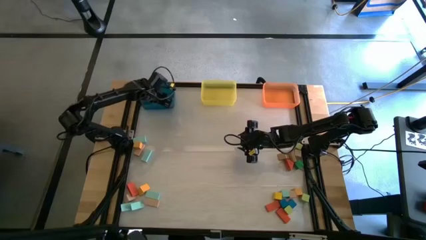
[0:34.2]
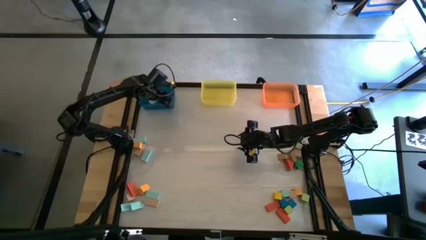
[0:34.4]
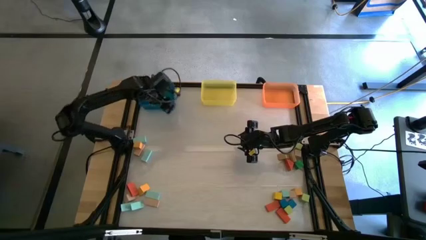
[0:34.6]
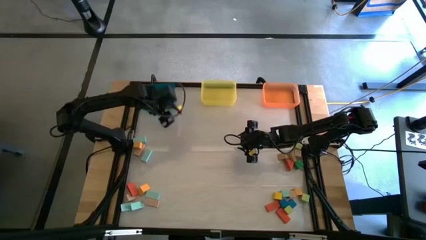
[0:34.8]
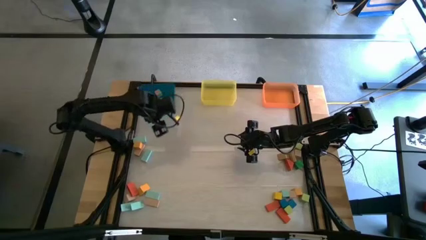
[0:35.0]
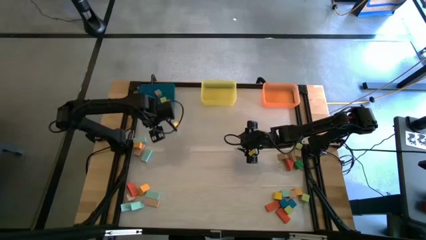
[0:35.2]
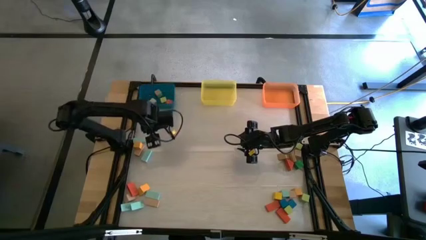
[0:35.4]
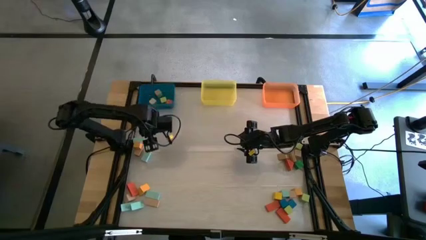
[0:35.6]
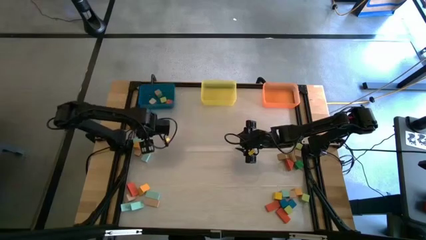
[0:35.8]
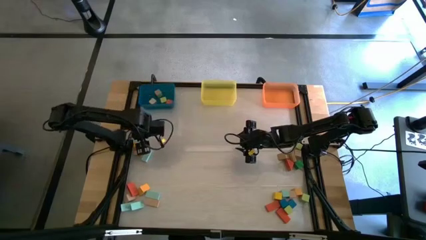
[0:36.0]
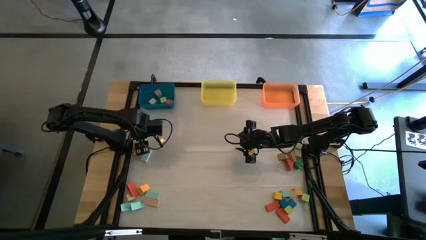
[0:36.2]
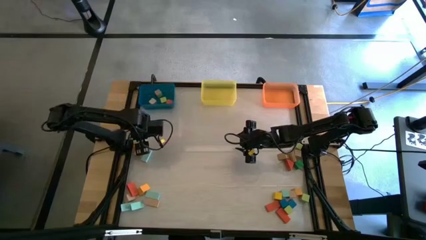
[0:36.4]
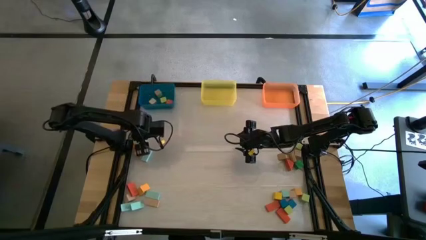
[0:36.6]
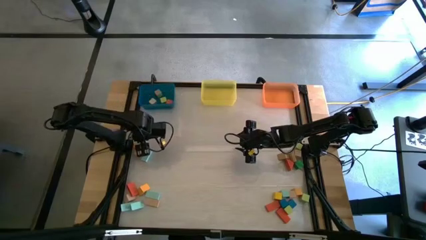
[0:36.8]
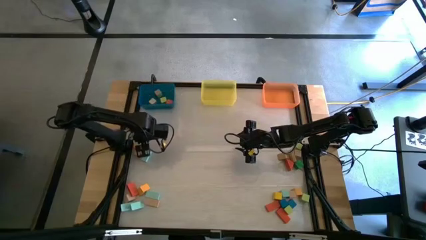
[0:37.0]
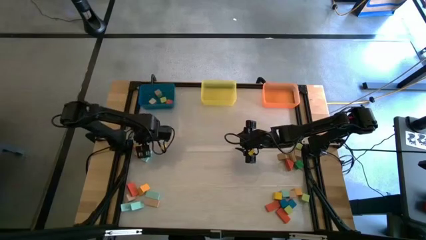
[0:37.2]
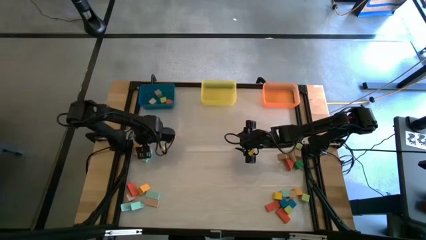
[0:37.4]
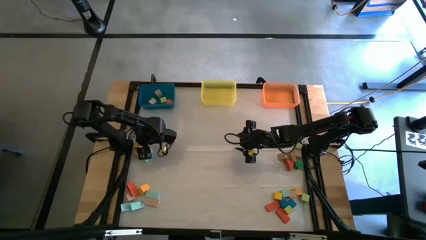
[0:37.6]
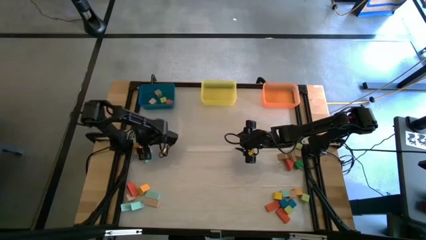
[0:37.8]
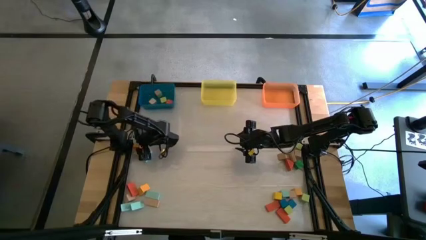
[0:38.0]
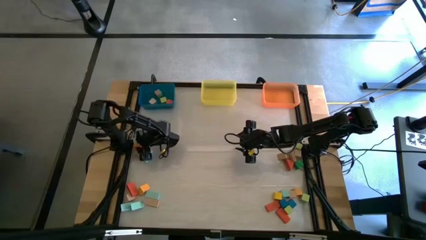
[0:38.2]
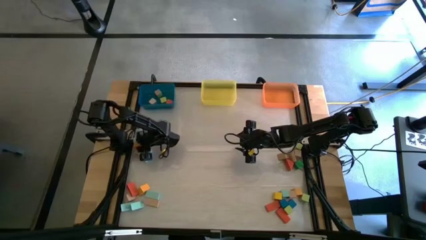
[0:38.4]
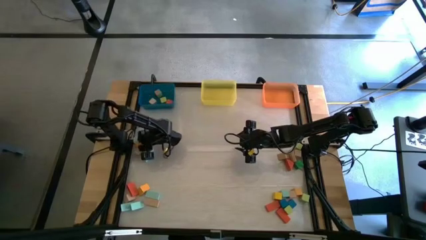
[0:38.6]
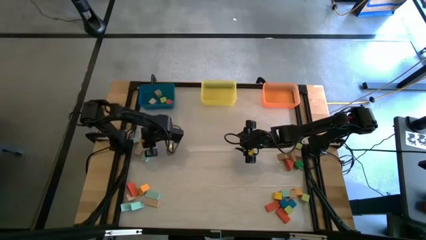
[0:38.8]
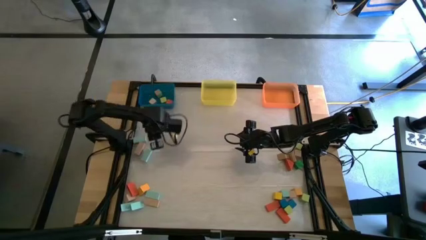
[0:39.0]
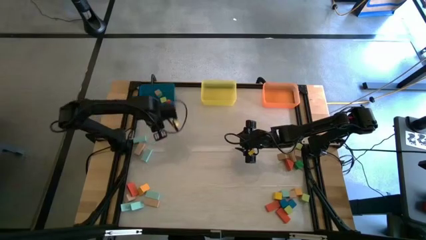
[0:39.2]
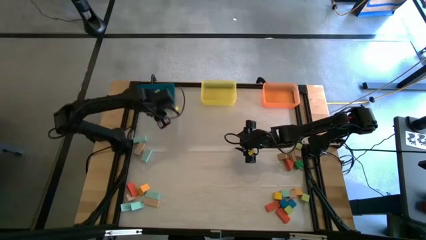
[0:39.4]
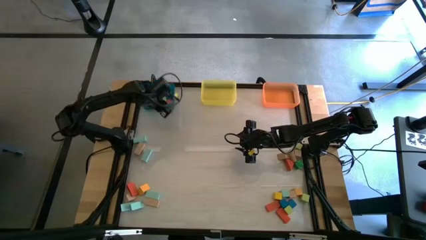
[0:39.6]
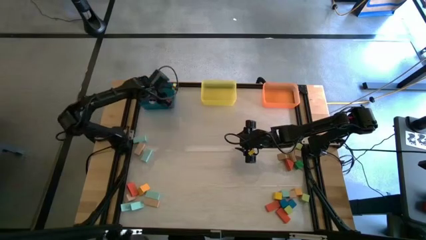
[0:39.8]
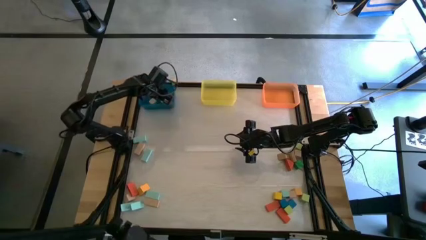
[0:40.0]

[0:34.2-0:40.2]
Task: Sort blocks by size
Put the yellow square block into the blue bin

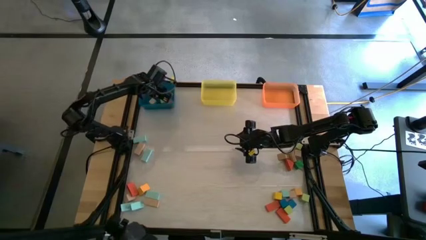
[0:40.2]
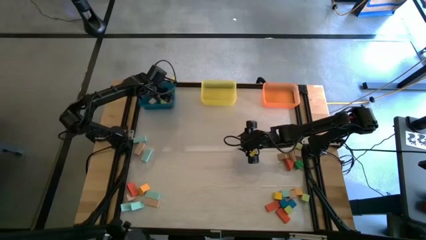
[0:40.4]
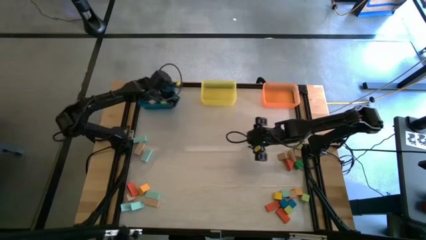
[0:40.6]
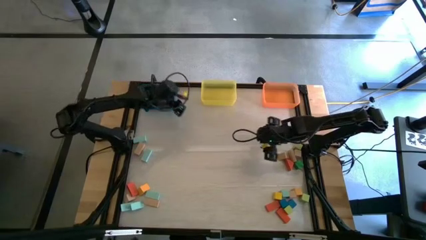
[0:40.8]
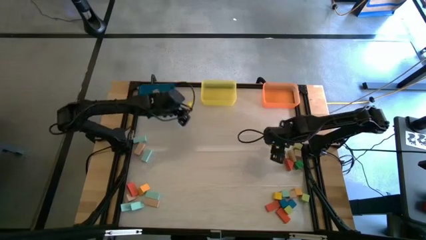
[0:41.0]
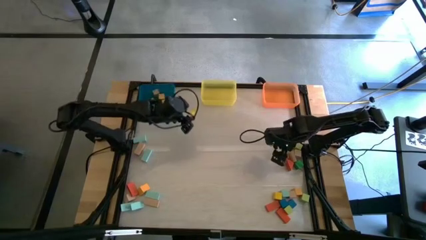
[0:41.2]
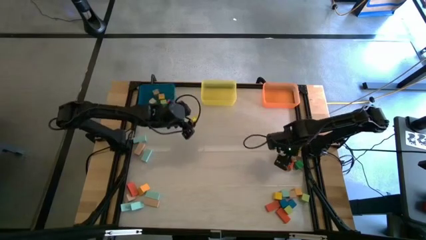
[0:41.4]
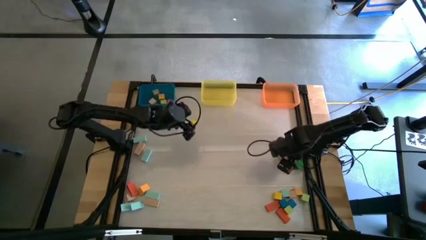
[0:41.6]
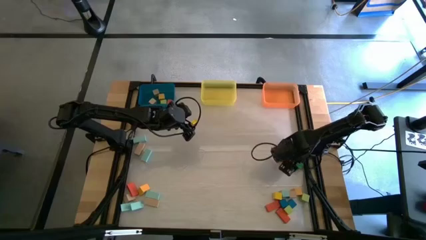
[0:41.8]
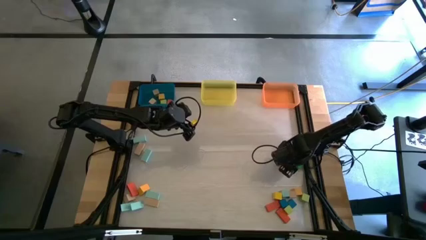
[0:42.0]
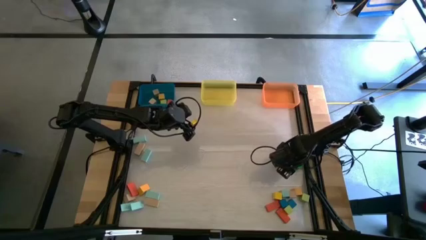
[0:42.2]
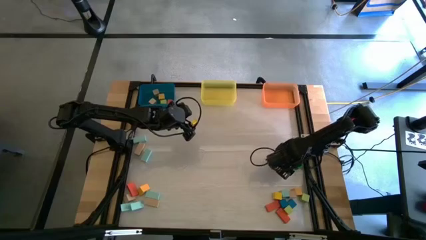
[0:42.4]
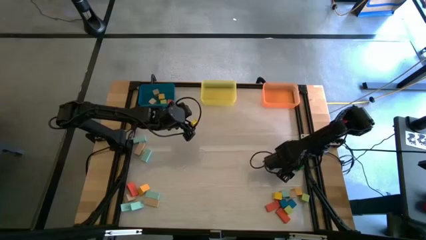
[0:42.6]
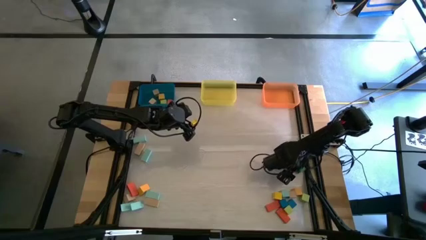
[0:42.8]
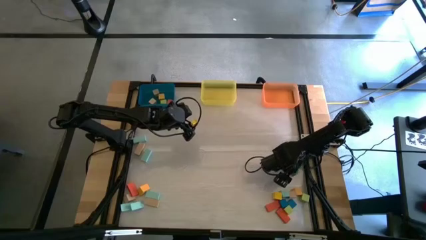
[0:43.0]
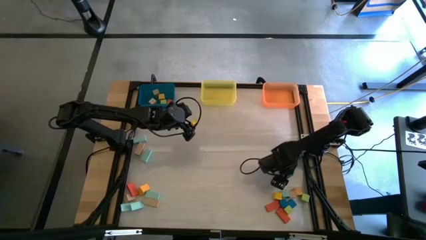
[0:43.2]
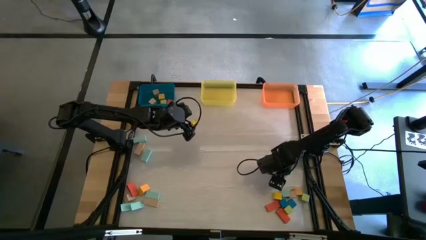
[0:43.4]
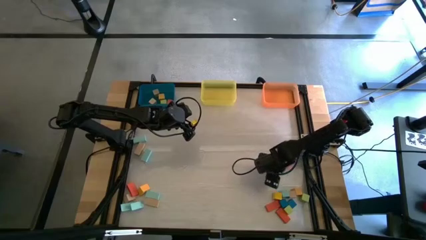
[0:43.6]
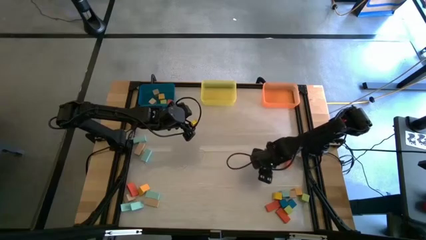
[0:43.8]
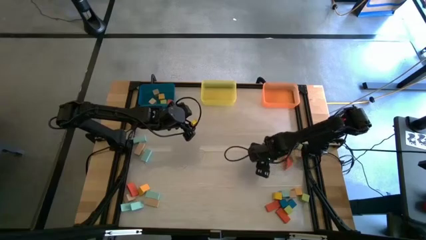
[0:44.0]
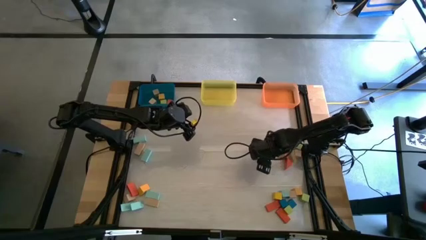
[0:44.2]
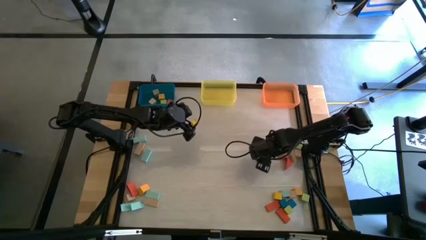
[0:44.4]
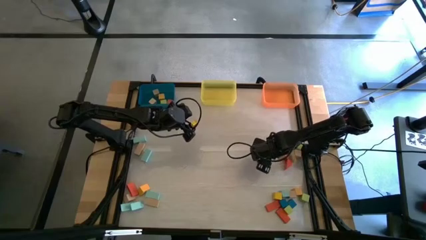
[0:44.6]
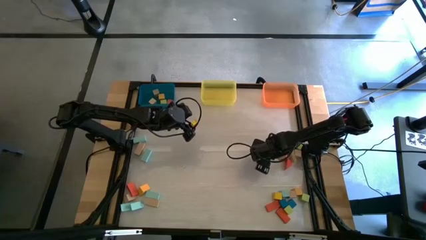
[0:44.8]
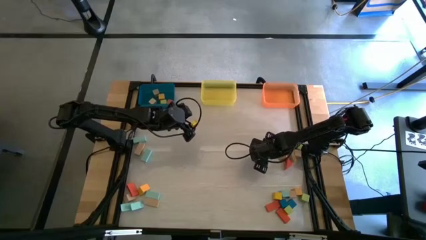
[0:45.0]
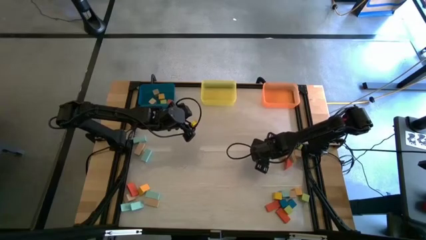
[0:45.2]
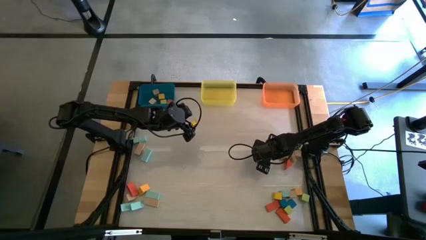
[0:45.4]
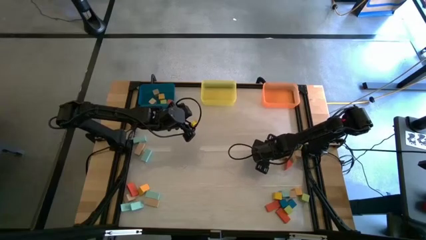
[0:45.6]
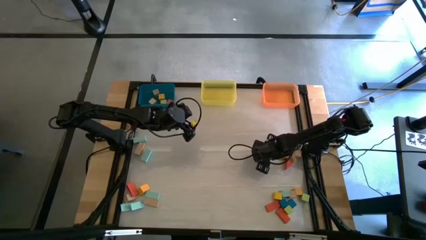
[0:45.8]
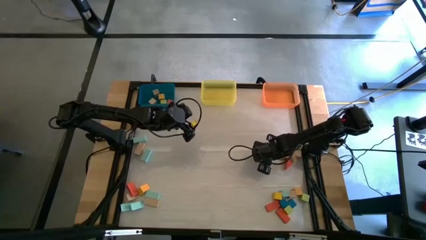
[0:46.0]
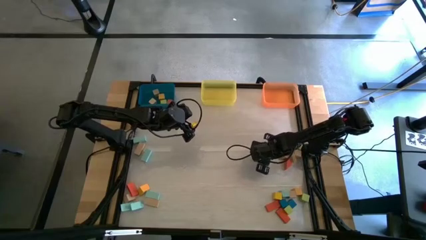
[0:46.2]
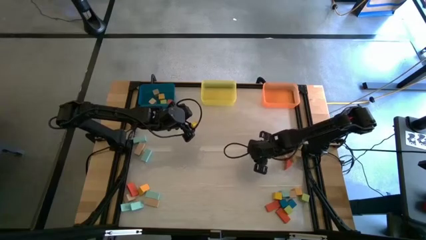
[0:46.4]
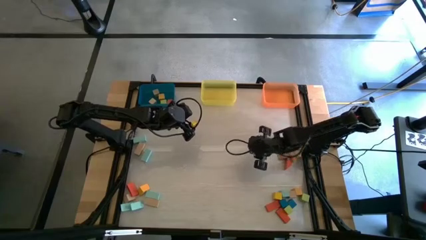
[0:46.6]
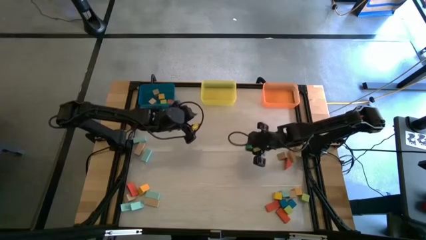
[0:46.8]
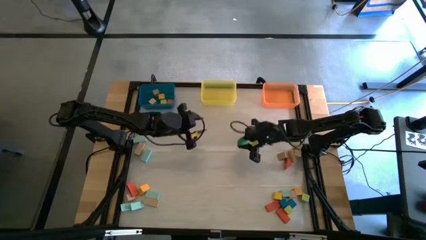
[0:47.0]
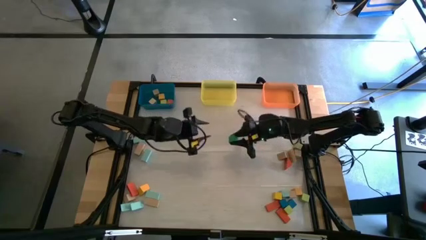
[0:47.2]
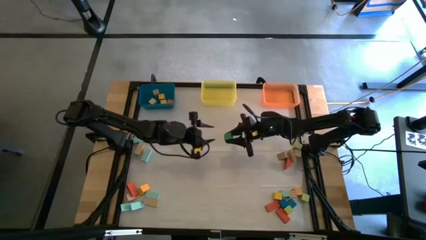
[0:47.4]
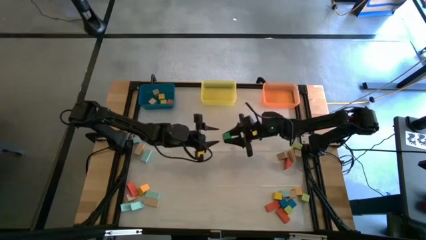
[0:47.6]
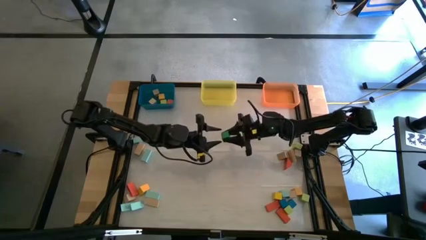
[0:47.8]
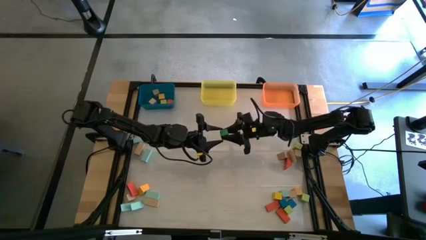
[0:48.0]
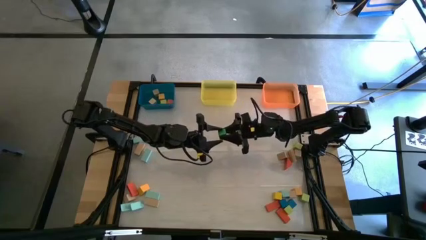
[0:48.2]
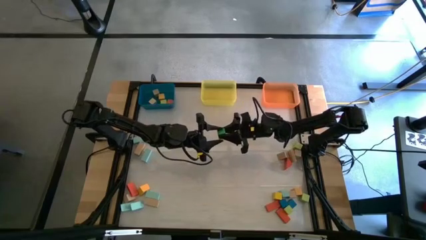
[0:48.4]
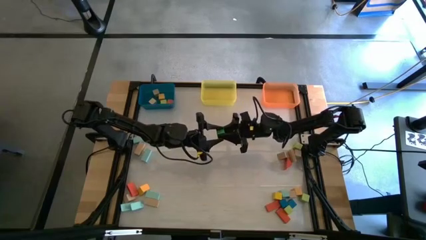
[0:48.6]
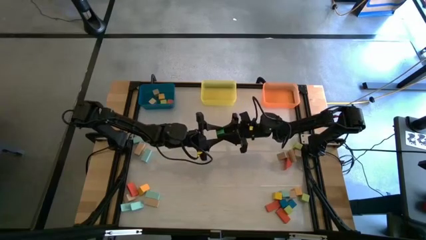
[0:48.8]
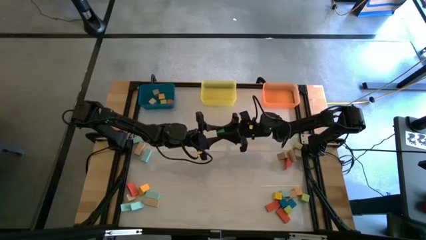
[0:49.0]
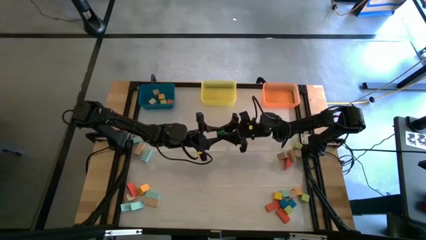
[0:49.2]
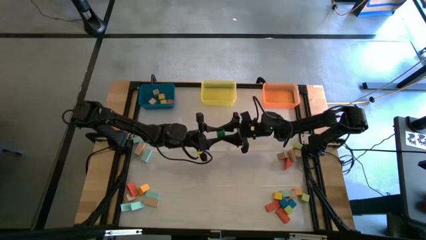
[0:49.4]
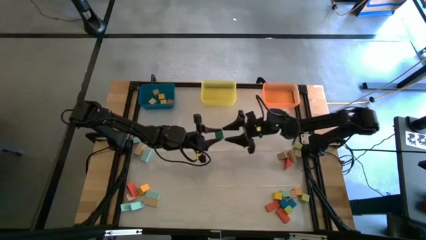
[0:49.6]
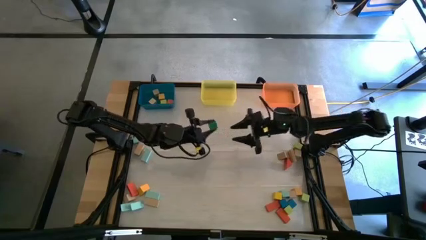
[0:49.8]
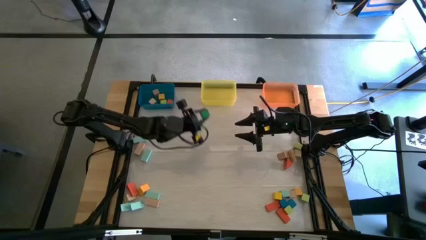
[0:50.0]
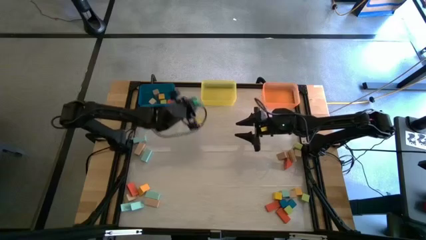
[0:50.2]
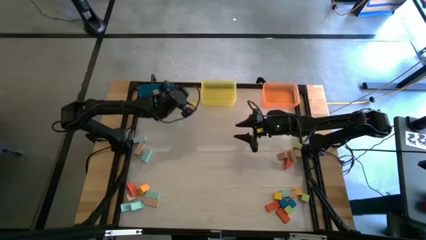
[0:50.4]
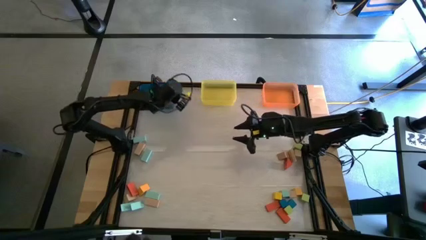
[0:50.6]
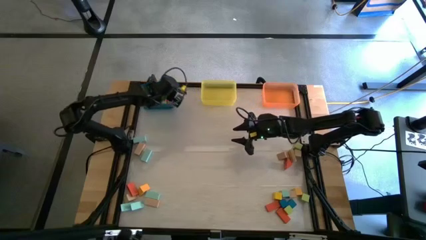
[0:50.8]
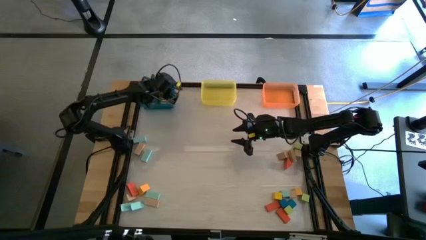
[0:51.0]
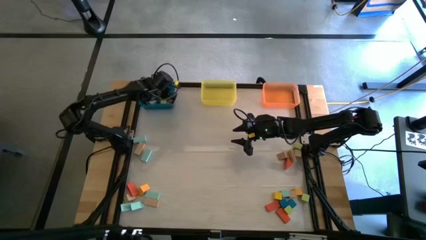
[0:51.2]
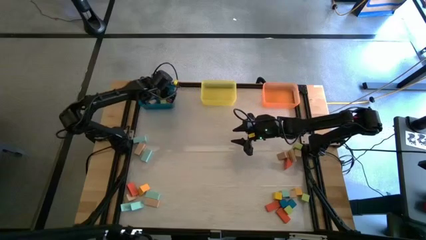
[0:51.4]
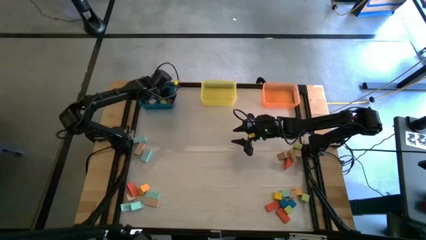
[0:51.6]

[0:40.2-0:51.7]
Put the green square block into the blue bin
